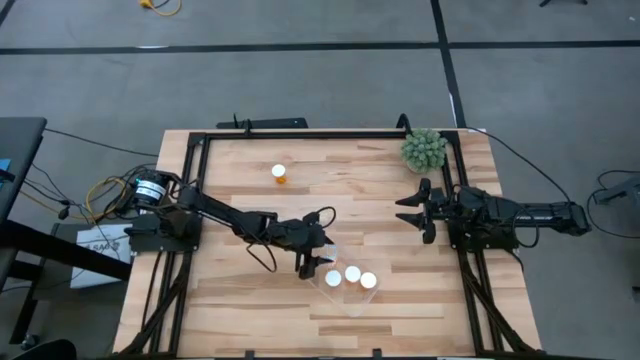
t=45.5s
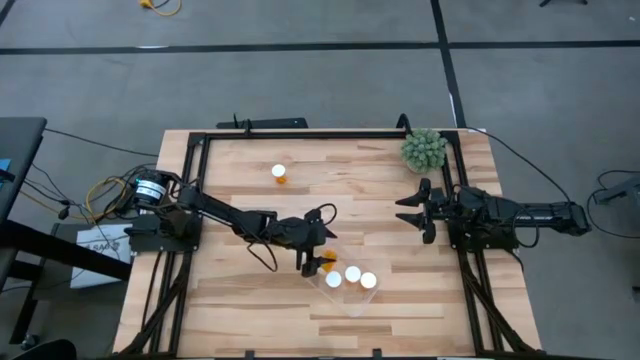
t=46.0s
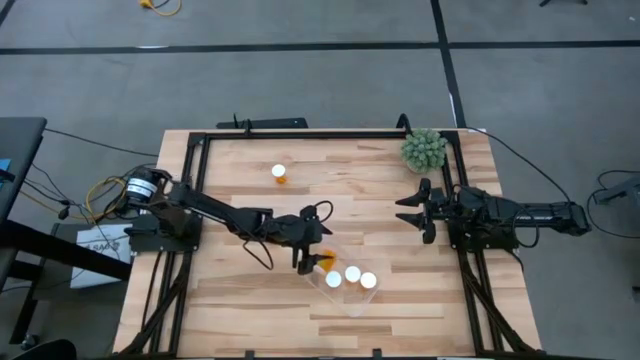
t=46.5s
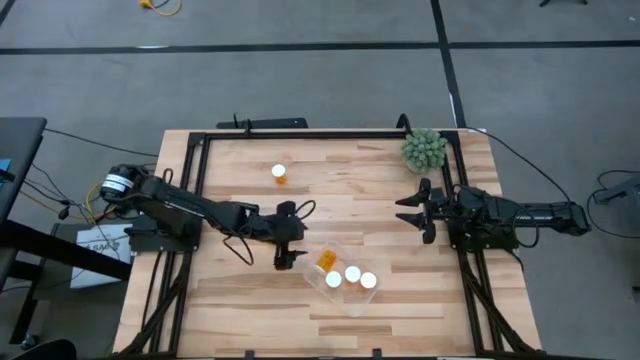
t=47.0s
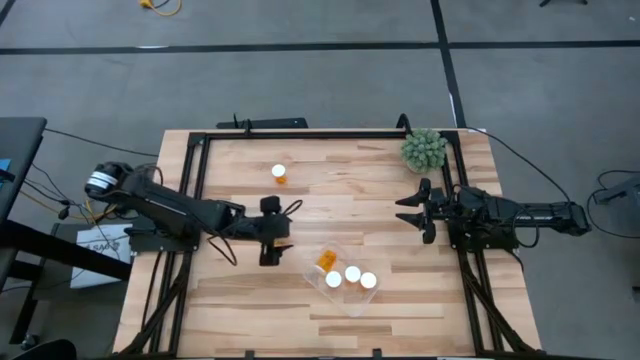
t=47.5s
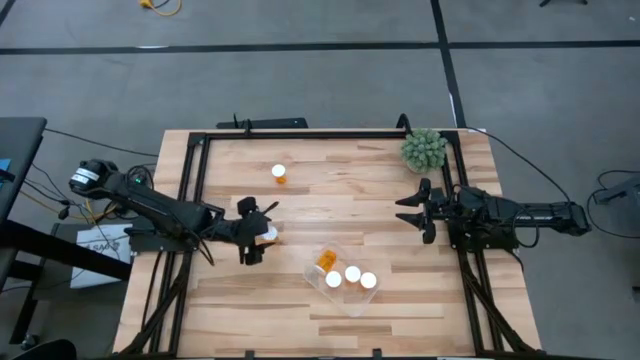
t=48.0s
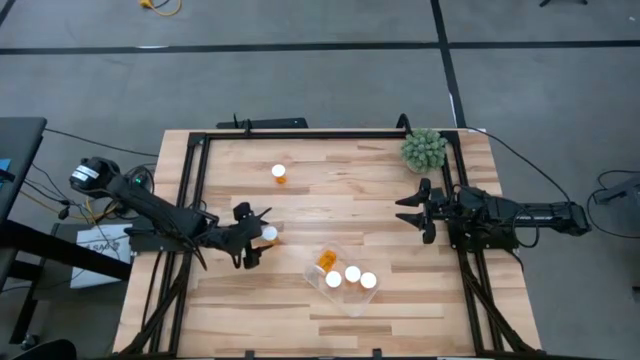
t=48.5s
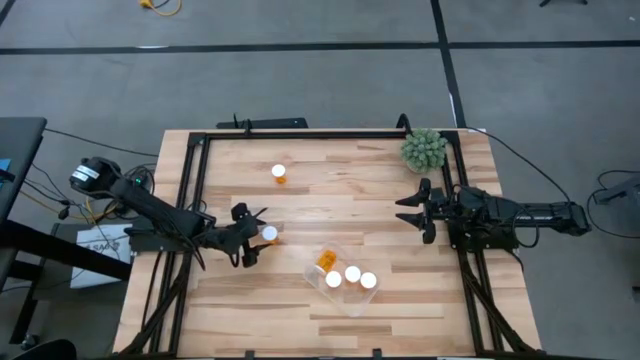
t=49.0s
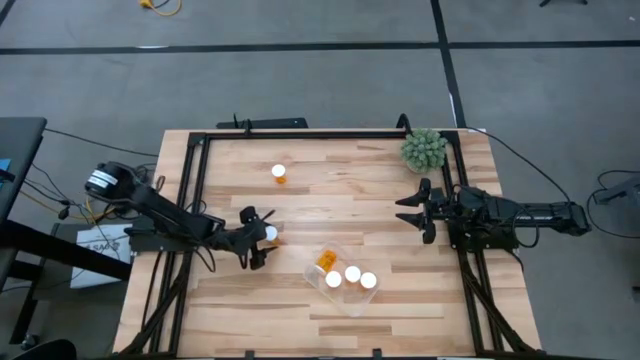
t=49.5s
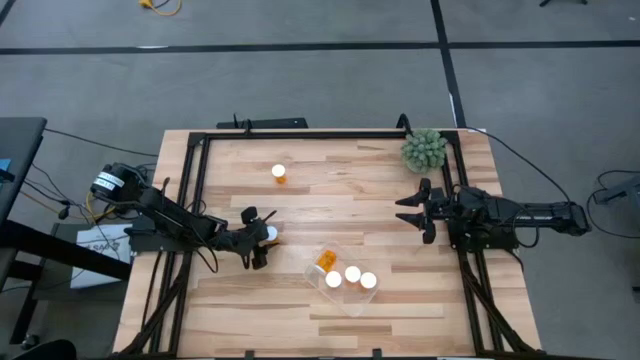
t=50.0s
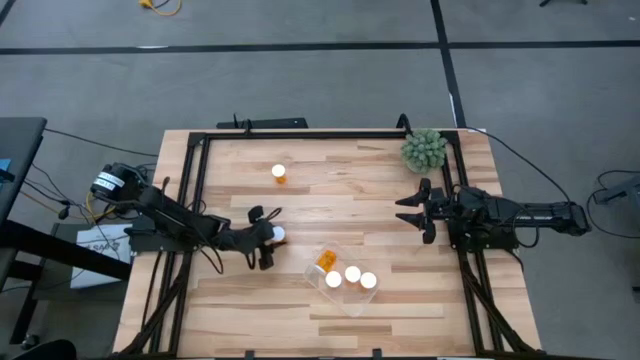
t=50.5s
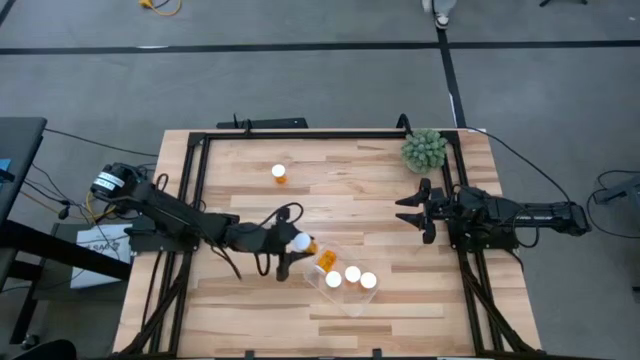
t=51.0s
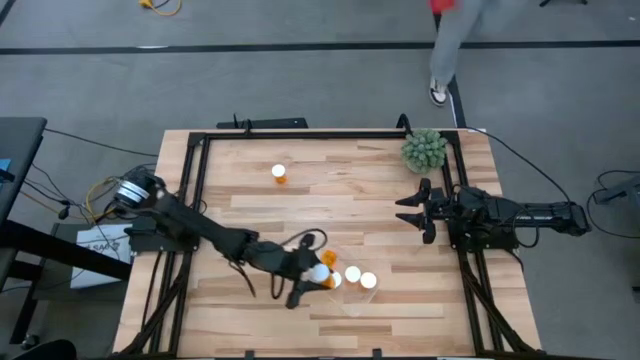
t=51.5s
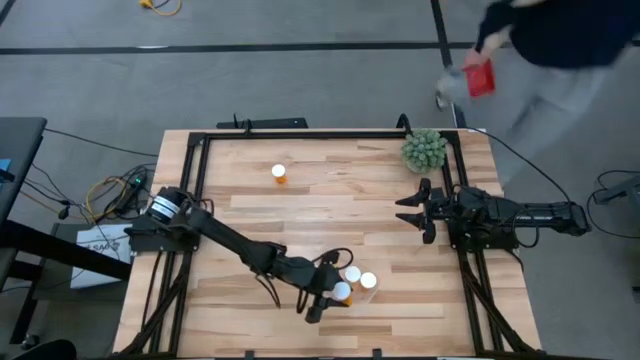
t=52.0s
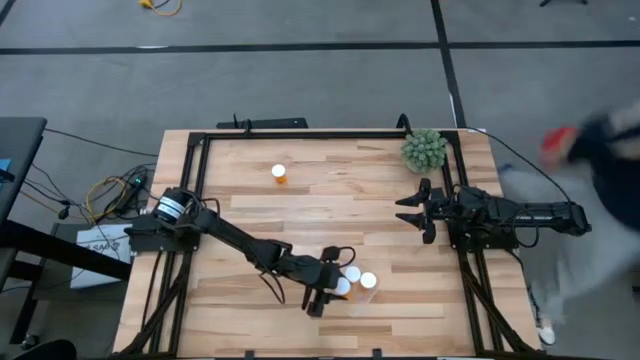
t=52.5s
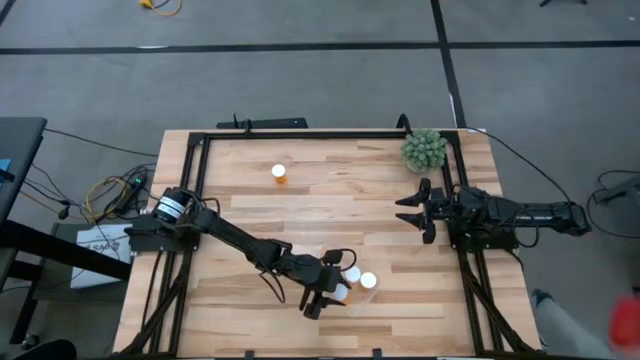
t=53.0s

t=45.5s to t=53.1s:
Task: Pick and place pill bottles into a basket
Put the orange pill bottle into the transparent container

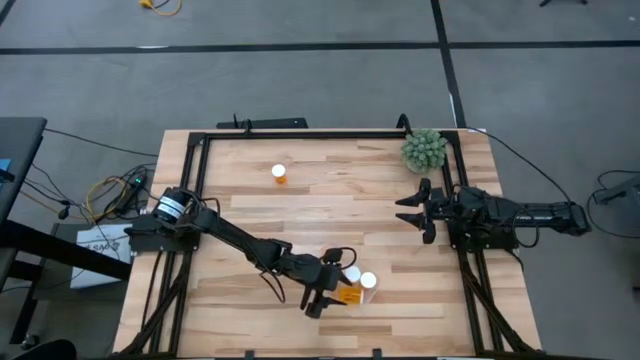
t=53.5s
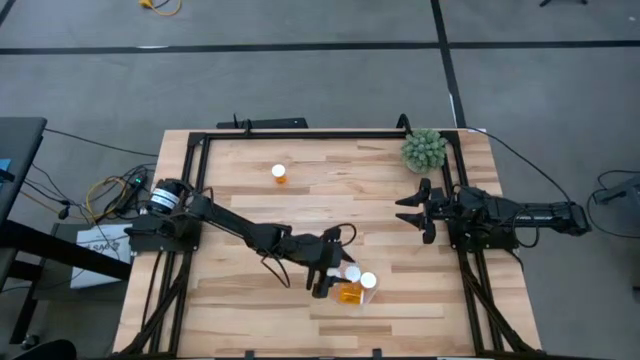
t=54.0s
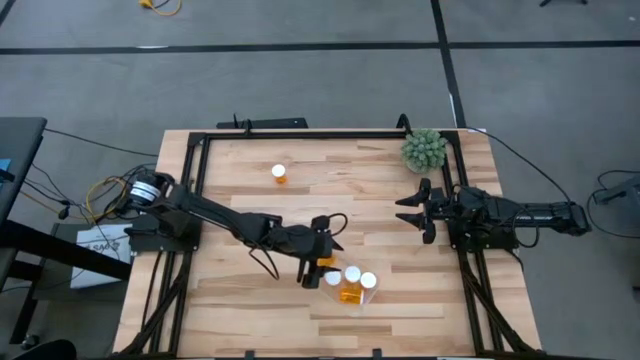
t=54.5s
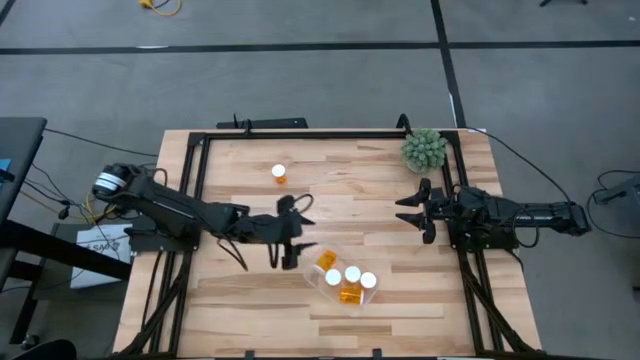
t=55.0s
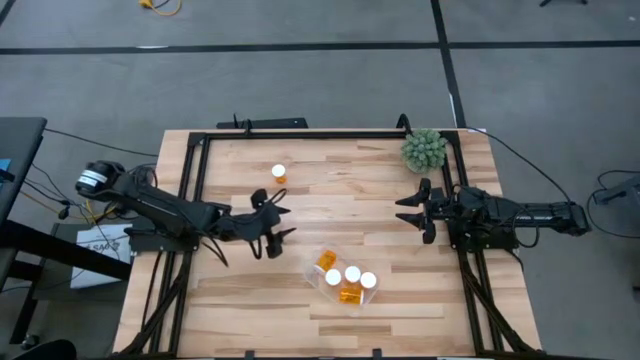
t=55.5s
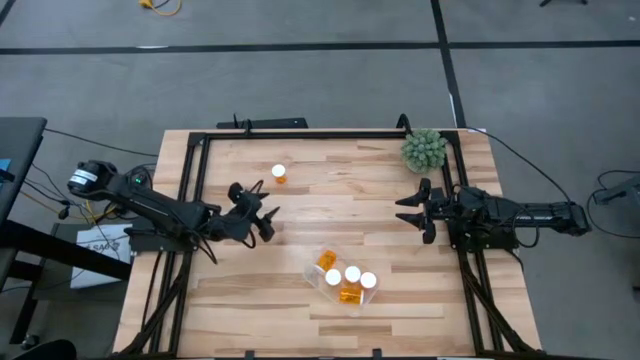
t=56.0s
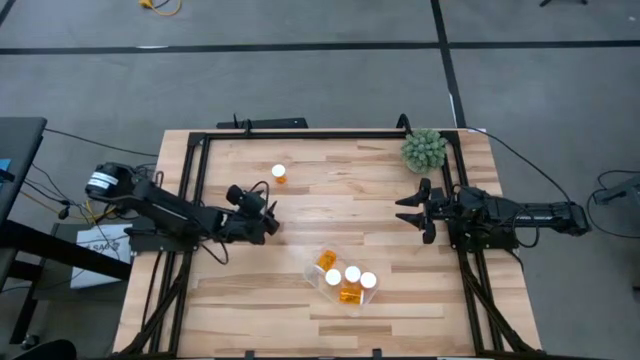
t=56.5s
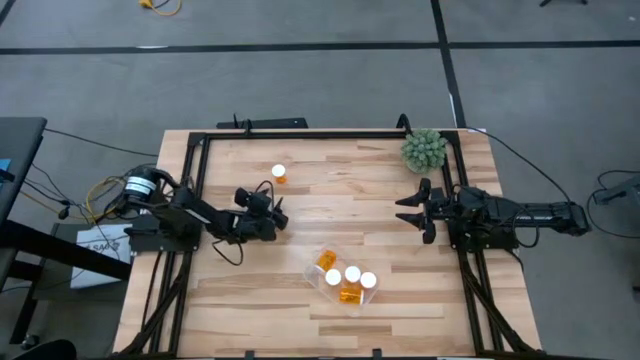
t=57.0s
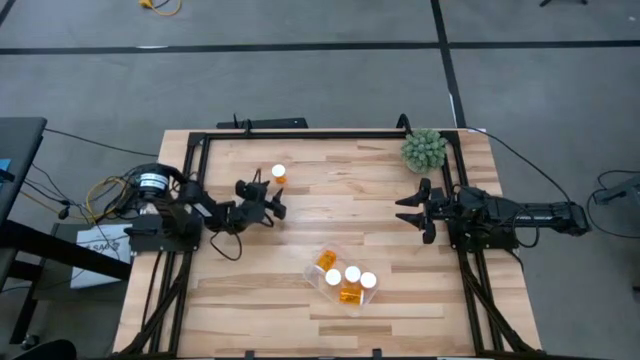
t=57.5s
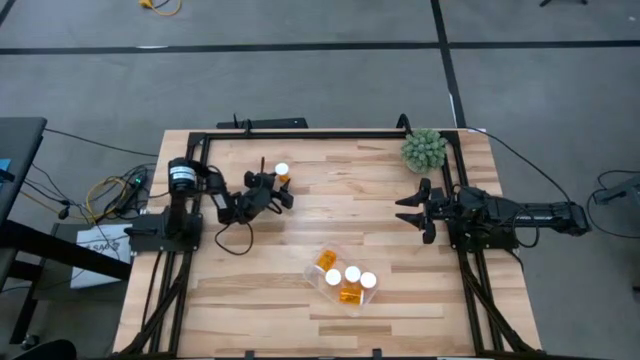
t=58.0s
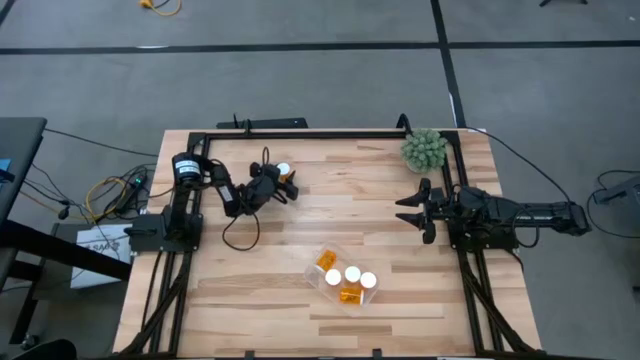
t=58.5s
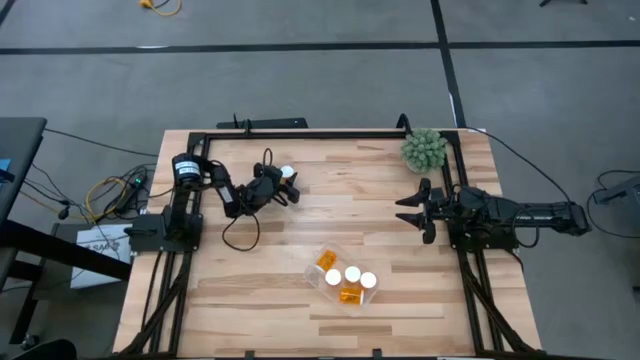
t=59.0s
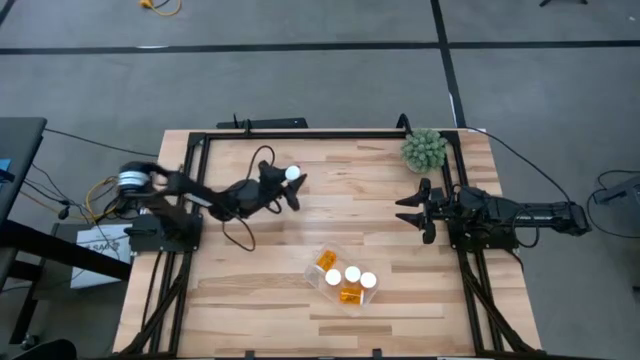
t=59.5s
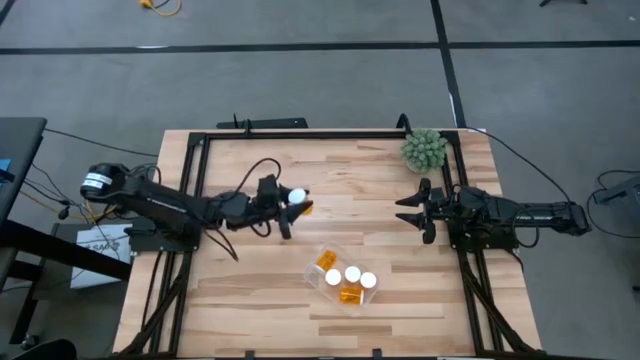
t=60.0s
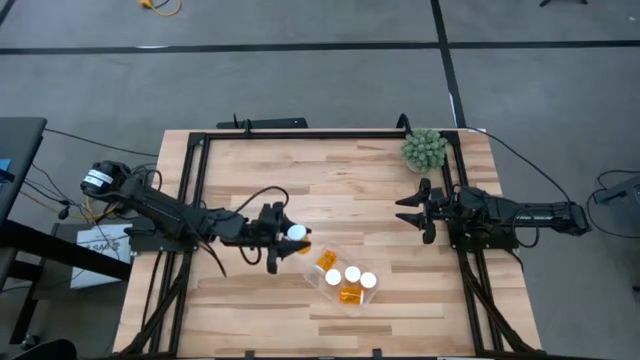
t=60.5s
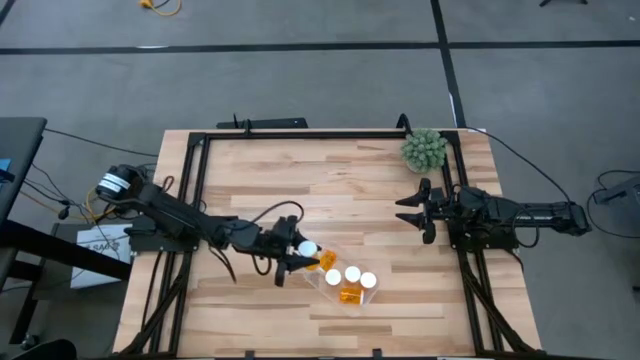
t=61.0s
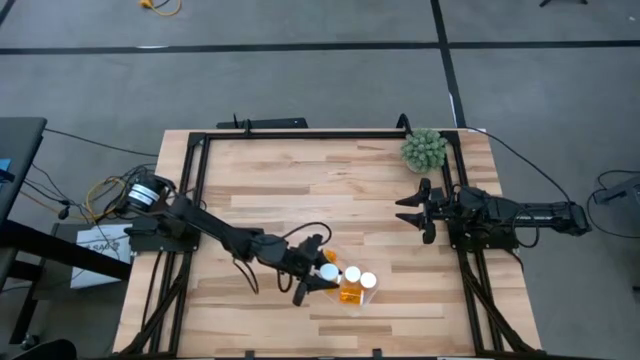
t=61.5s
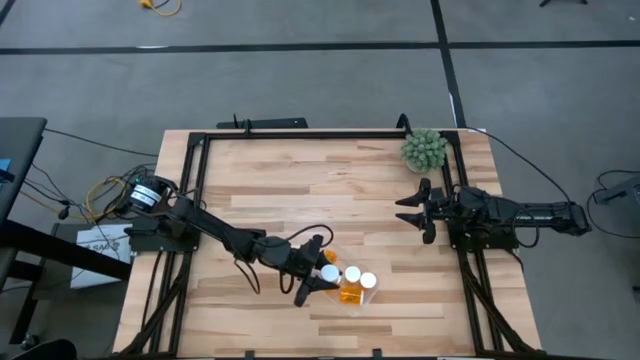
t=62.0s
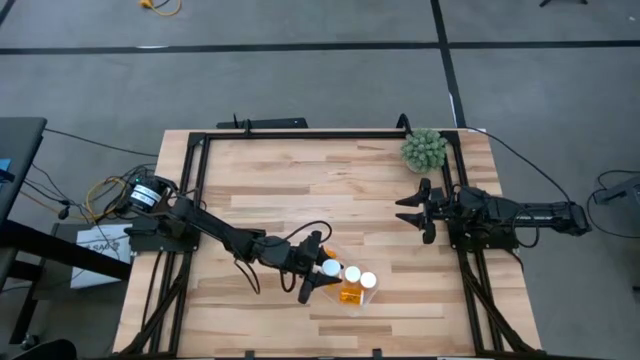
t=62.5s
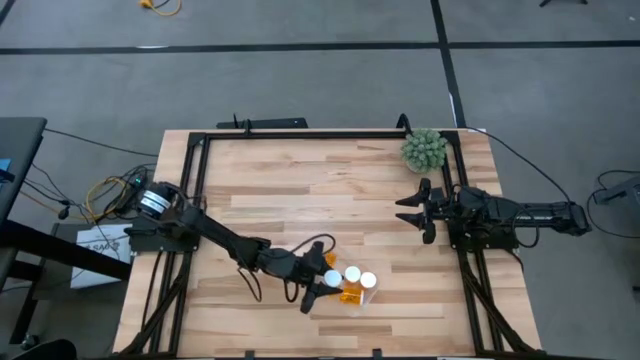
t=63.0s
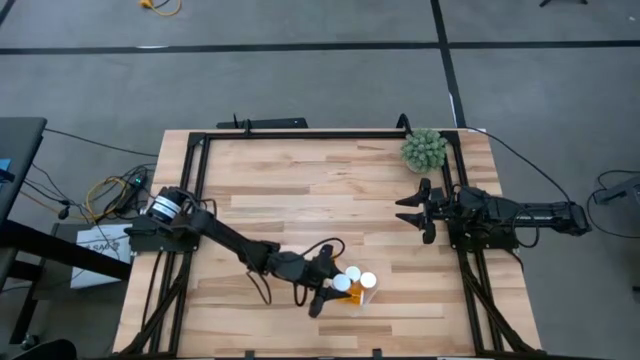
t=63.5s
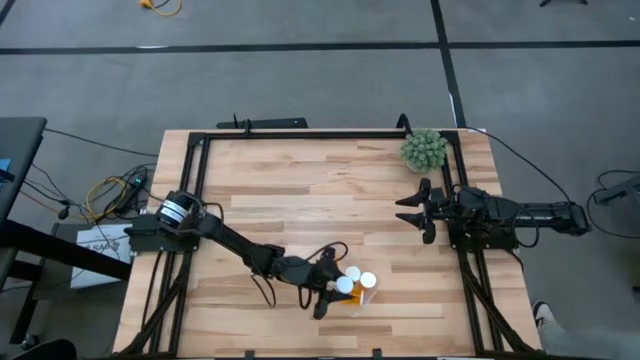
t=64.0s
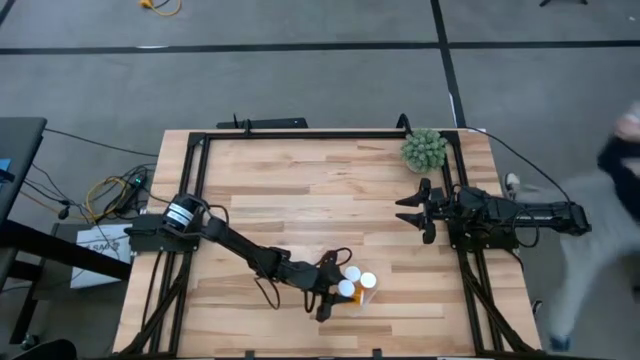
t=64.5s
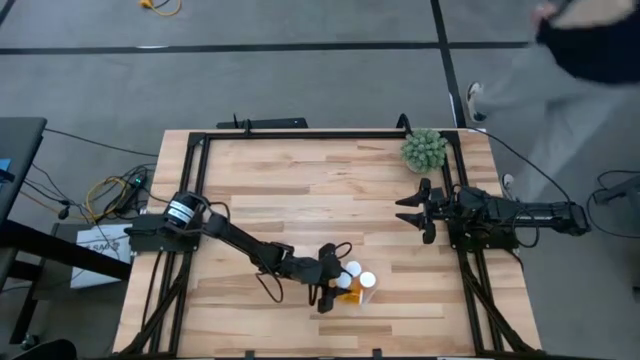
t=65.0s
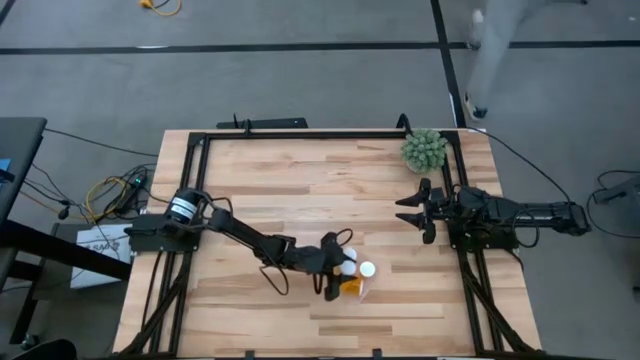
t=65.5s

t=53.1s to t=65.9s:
Put the orange pill bottle into the transparent container

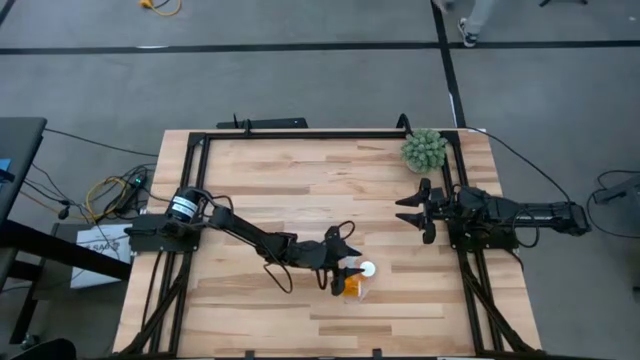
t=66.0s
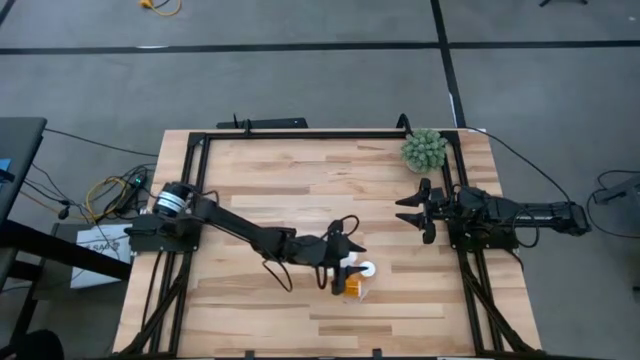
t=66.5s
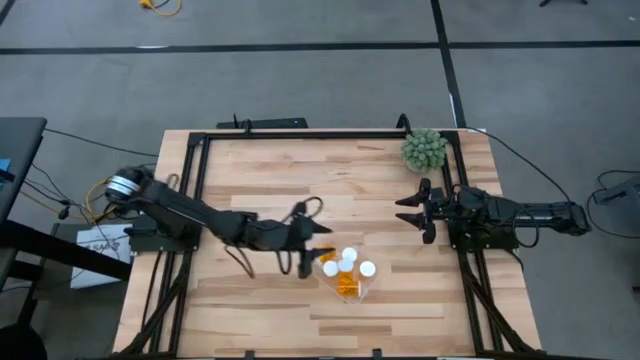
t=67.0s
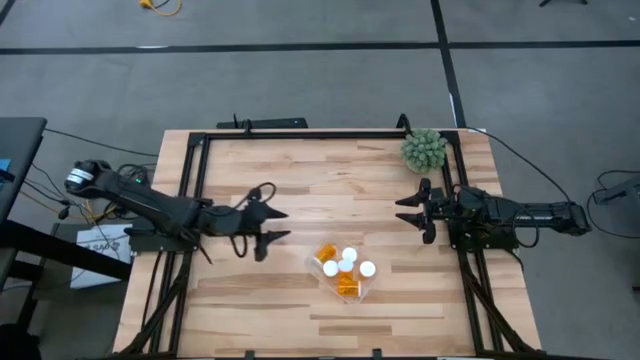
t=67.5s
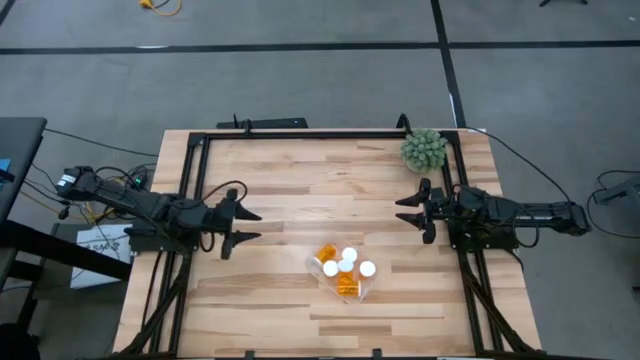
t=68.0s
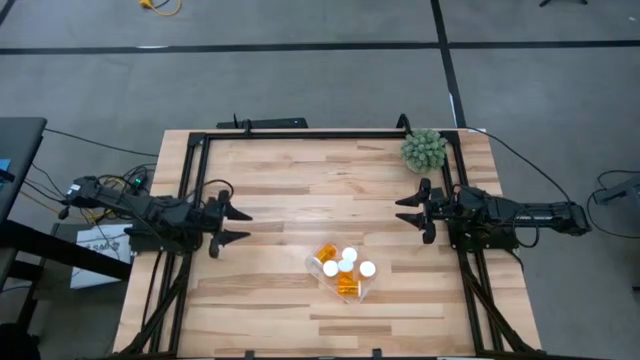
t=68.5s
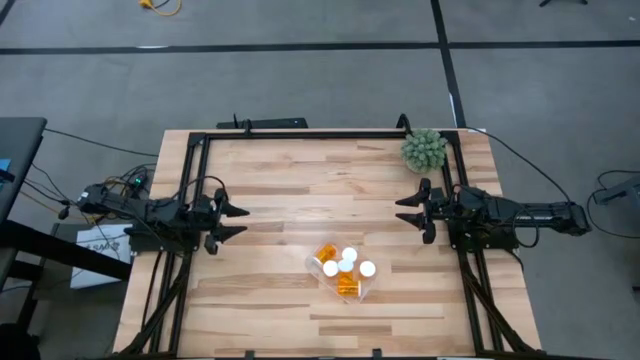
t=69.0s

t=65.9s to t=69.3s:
Return to Home Position
